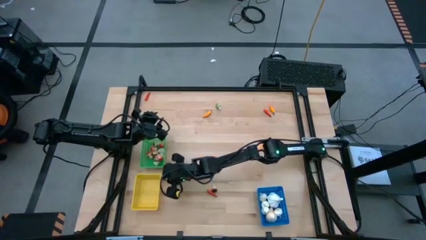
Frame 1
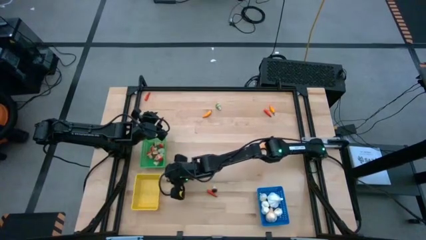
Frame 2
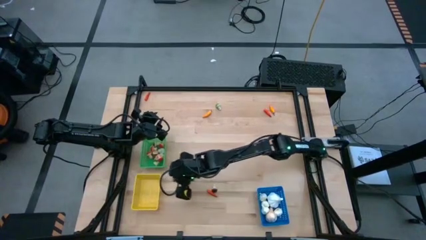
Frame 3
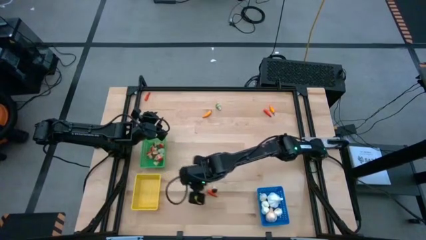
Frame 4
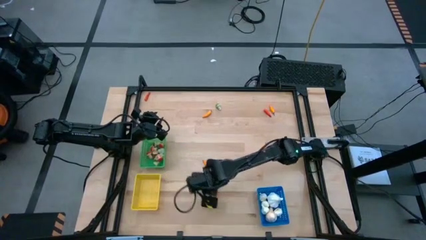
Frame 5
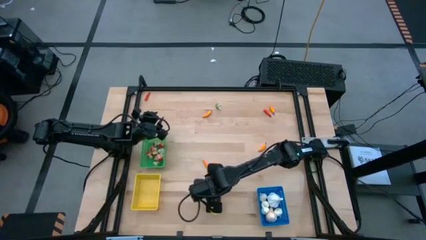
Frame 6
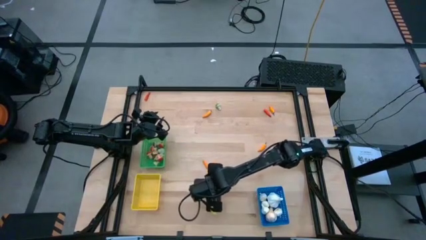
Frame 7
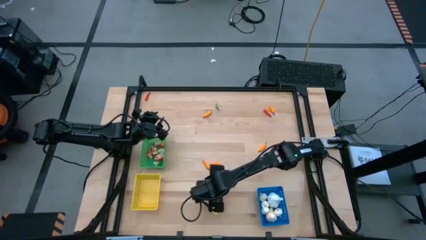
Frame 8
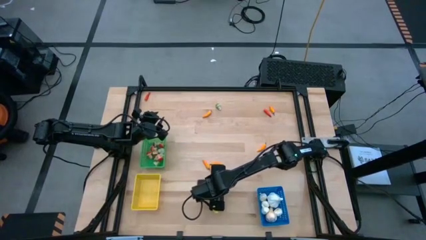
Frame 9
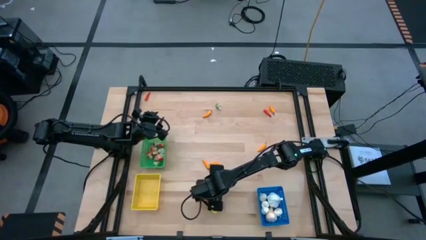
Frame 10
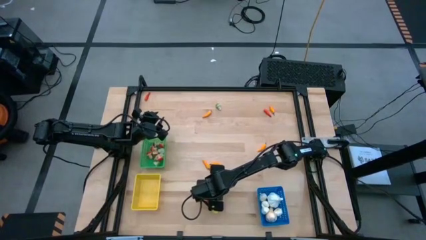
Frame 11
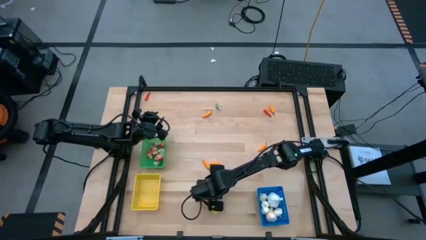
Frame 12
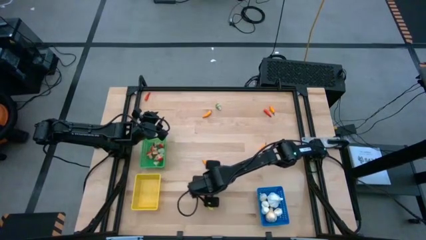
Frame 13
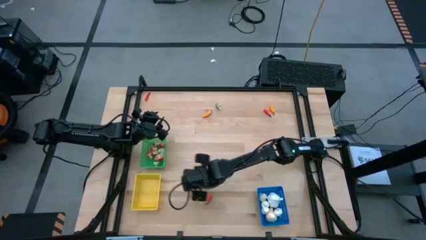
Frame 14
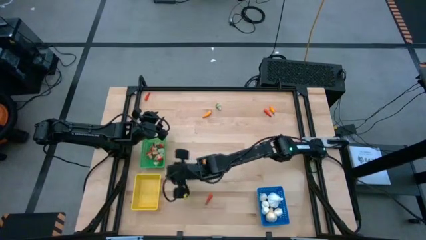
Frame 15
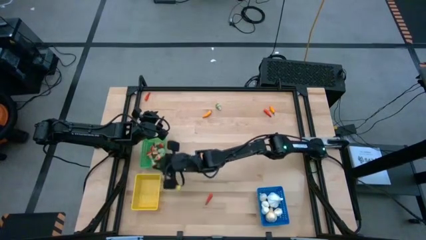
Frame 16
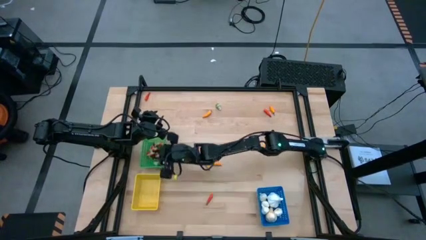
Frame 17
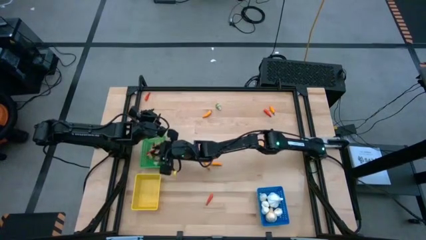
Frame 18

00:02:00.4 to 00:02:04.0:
Task: Sort produce into baskets
Put the brown mushroom into the green bin

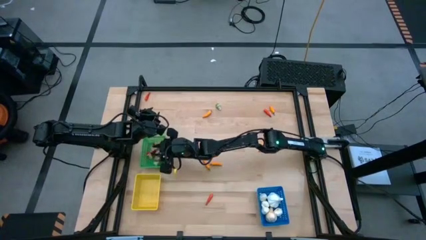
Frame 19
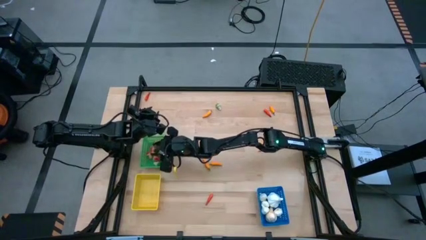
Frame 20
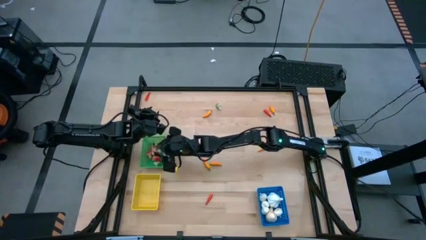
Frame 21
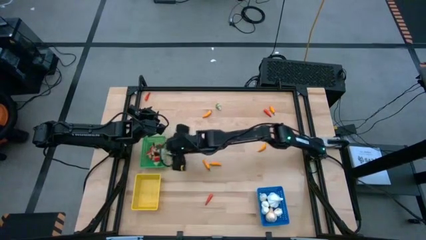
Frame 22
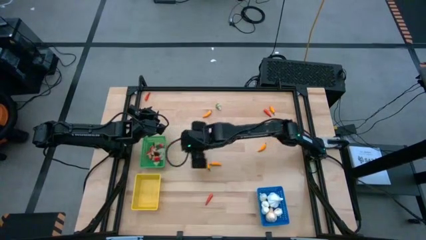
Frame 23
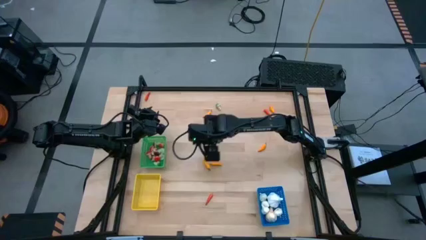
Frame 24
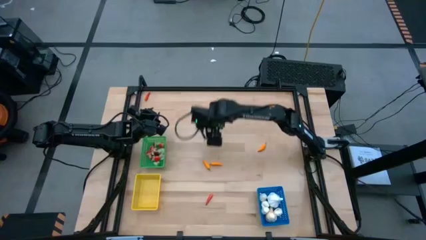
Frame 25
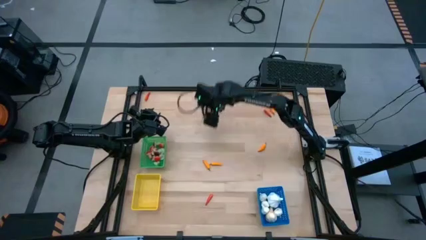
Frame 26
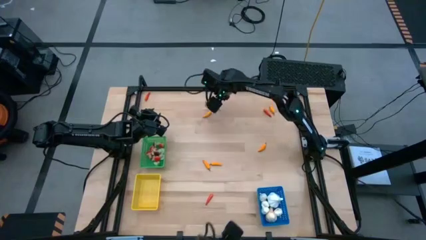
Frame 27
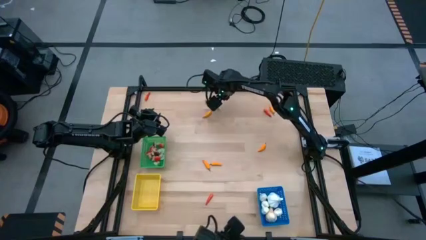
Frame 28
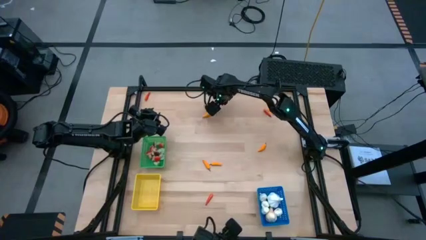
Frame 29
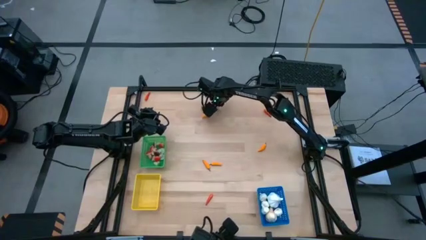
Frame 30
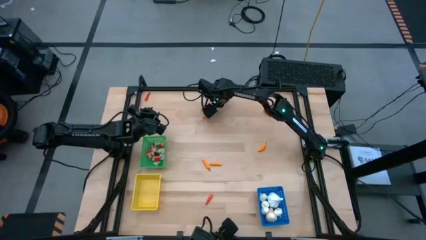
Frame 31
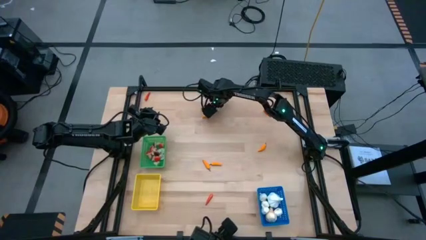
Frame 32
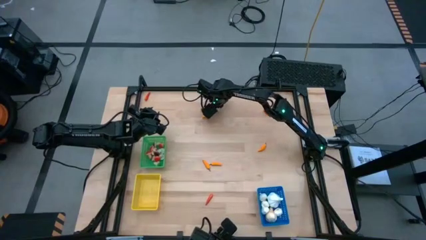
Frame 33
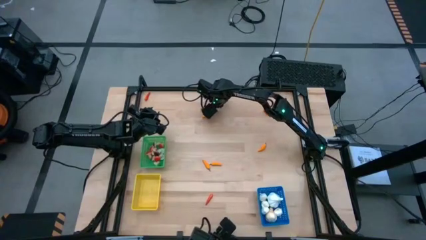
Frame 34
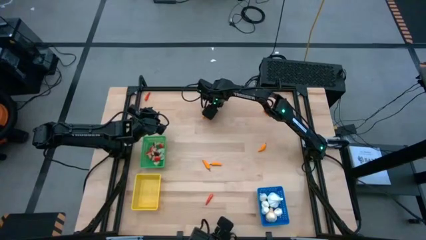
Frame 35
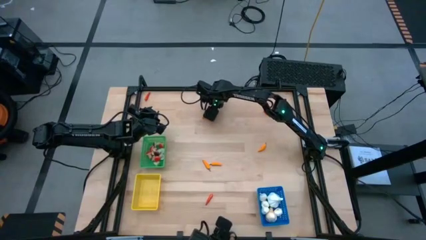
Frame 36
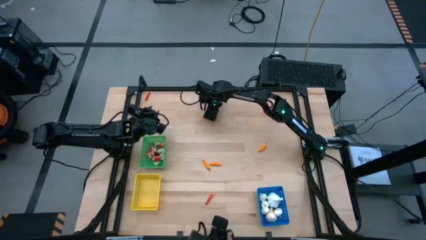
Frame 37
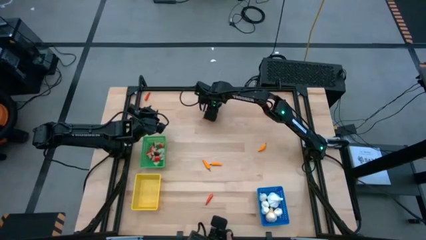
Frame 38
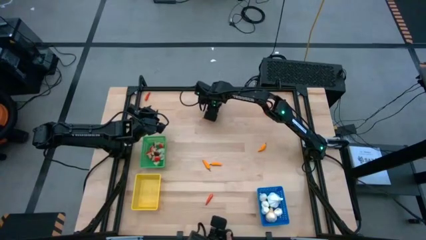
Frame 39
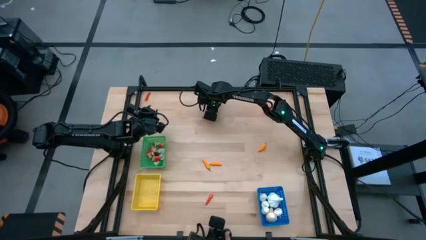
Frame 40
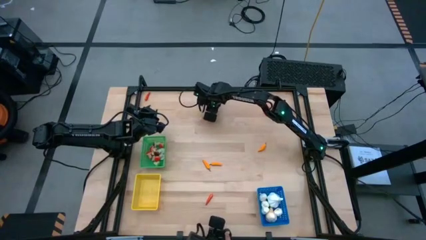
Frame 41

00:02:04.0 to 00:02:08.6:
Put the green mushroom into the green bin

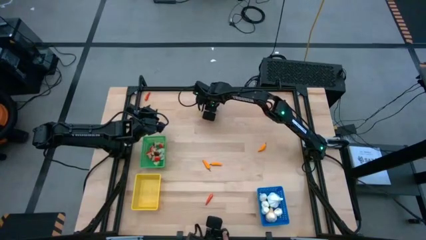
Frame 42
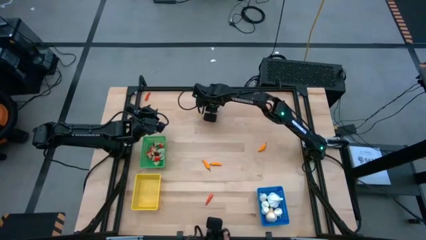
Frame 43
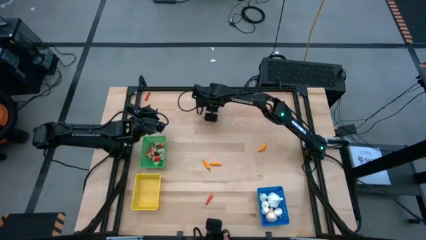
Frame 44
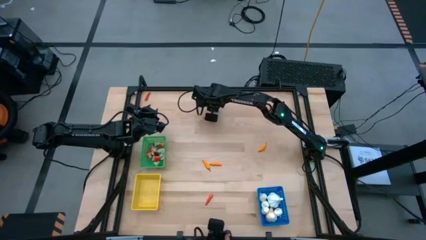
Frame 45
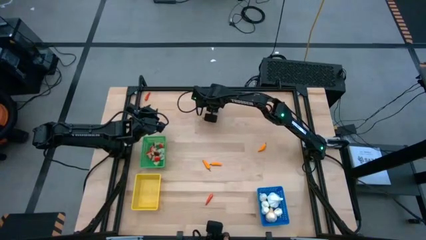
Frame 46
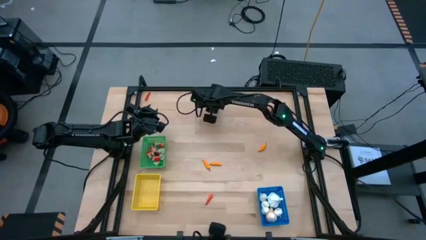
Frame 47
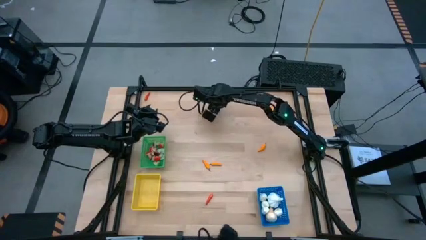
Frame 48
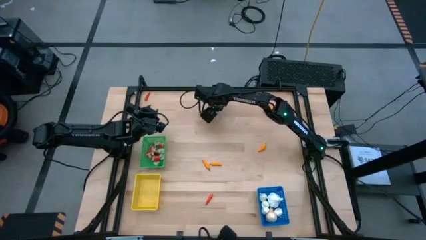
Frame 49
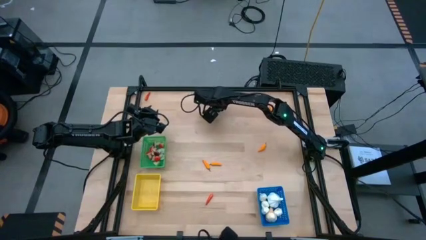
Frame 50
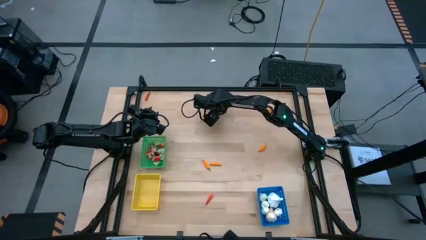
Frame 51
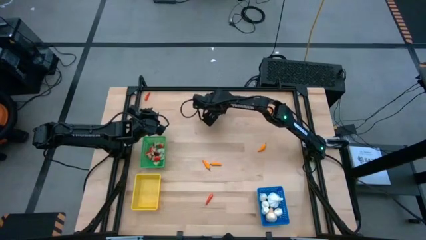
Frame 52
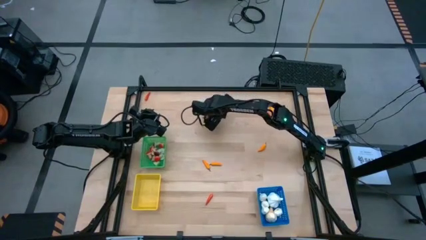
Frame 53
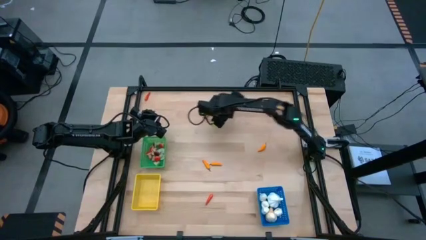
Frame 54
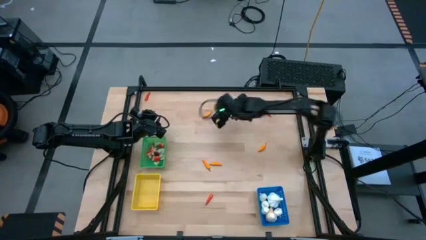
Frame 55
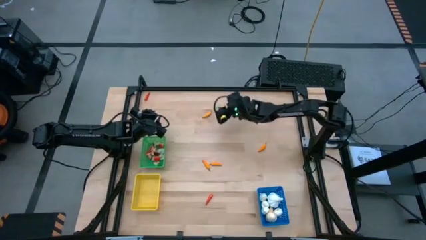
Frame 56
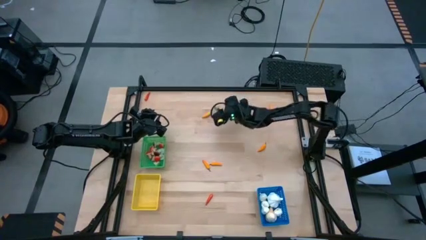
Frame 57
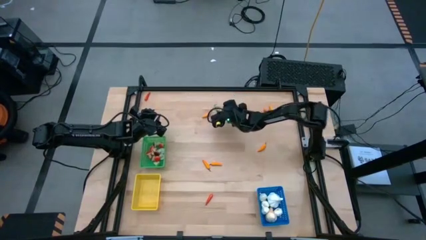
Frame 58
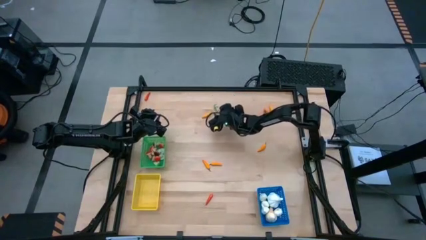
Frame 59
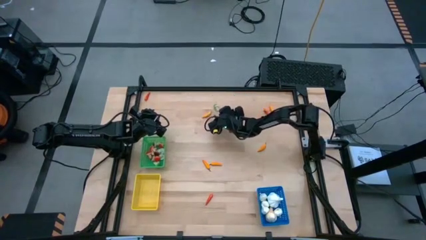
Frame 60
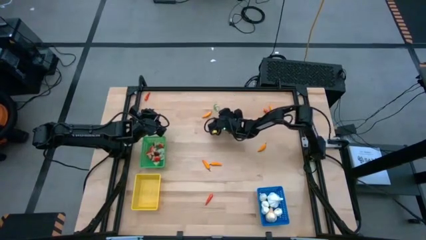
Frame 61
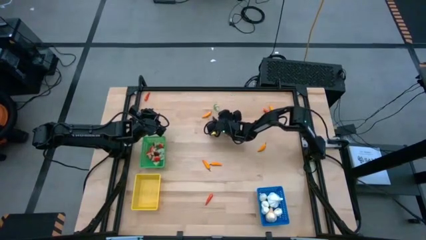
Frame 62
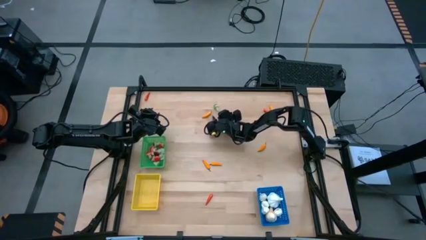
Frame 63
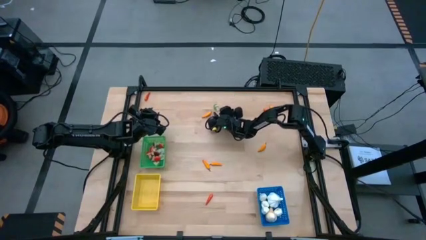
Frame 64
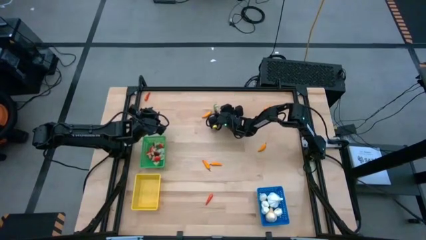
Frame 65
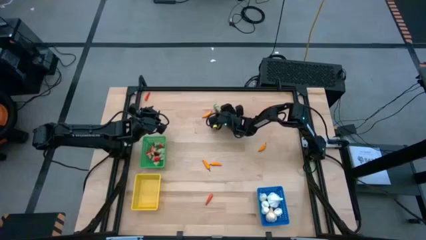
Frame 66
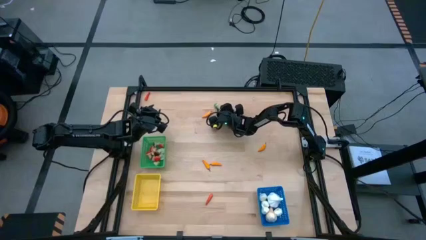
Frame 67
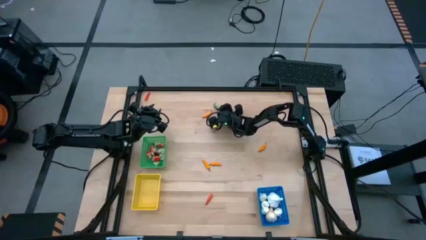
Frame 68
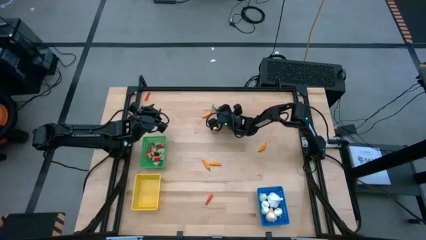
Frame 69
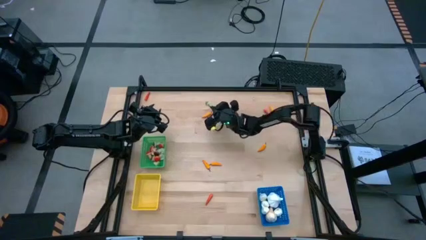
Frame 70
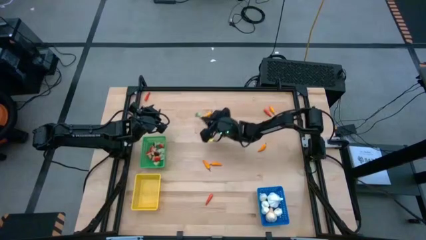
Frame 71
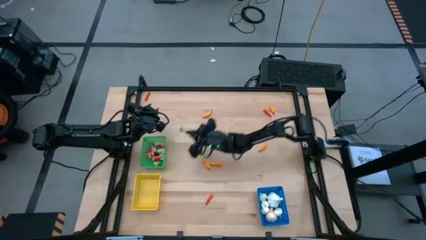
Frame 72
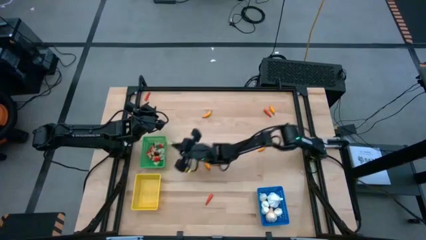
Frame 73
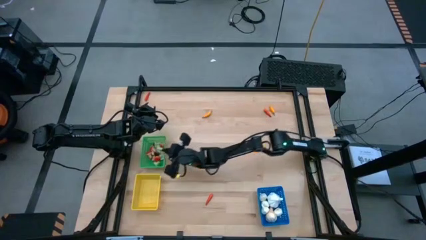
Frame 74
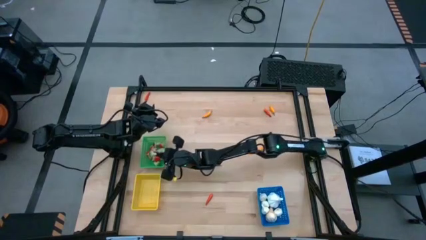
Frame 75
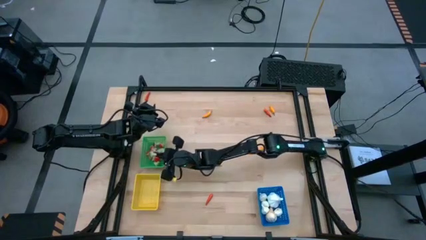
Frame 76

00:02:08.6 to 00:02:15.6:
Put the green mushroom into the green bin

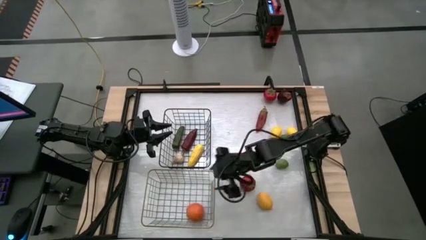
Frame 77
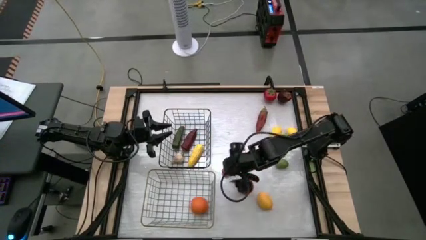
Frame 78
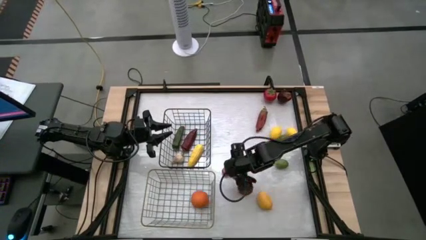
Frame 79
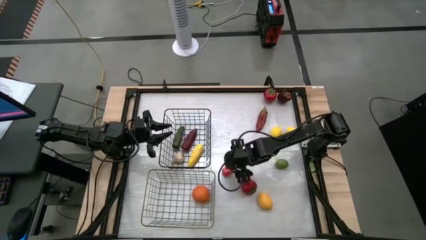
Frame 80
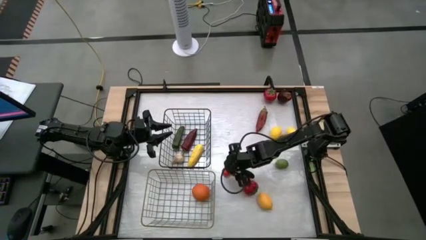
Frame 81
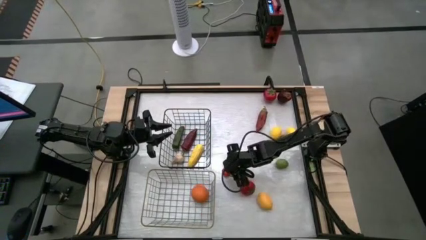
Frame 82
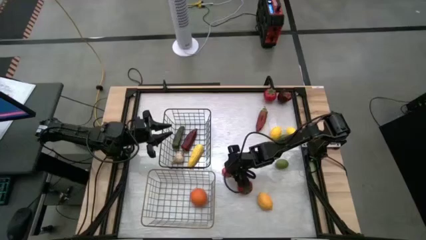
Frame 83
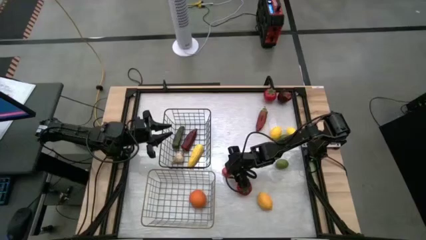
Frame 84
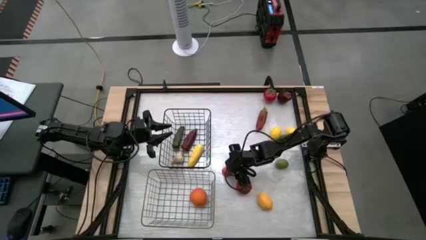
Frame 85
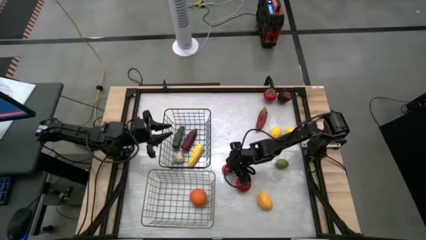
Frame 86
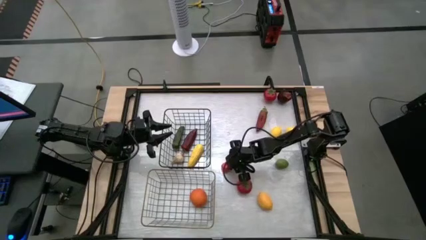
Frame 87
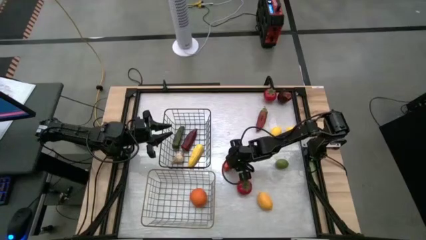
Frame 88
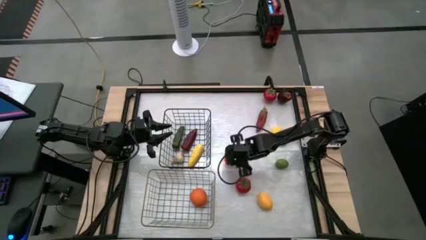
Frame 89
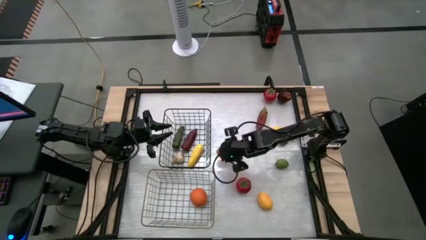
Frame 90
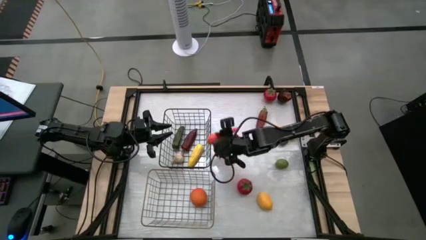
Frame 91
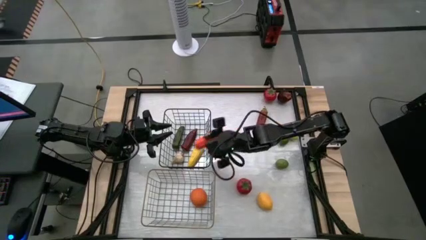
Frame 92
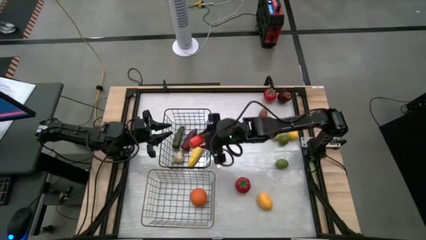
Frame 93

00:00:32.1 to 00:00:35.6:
Task: Sort produce into baskets
Put the carrot into the black wire basket
